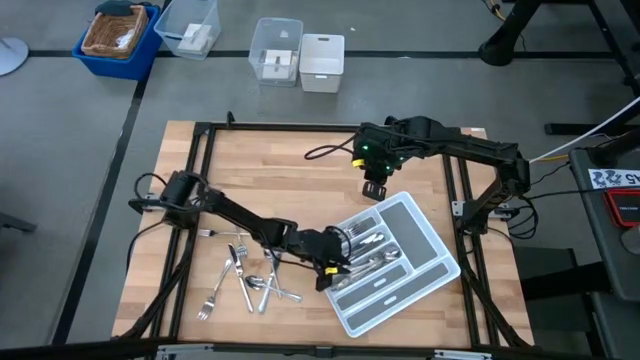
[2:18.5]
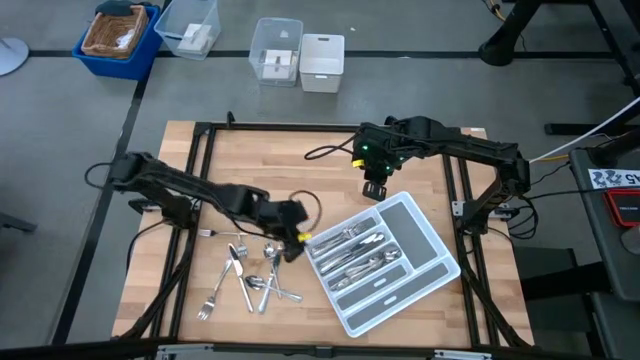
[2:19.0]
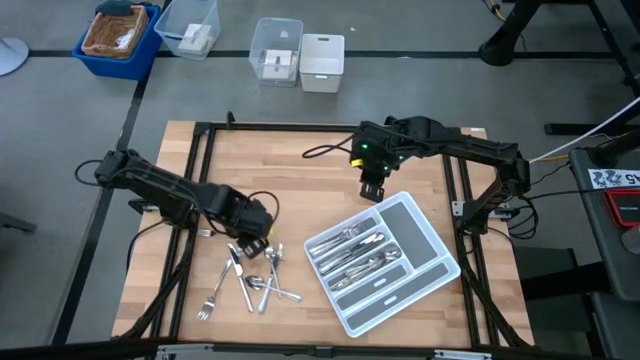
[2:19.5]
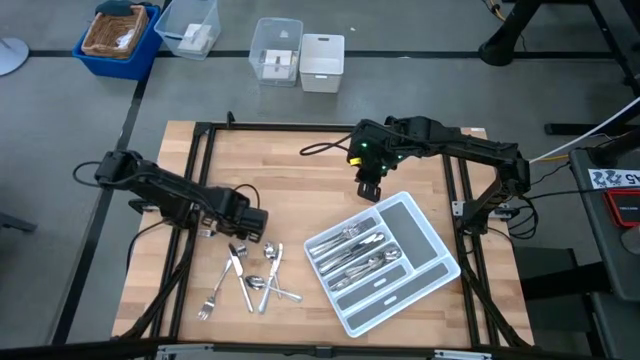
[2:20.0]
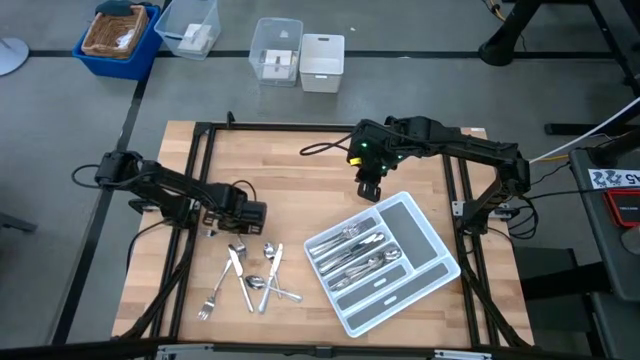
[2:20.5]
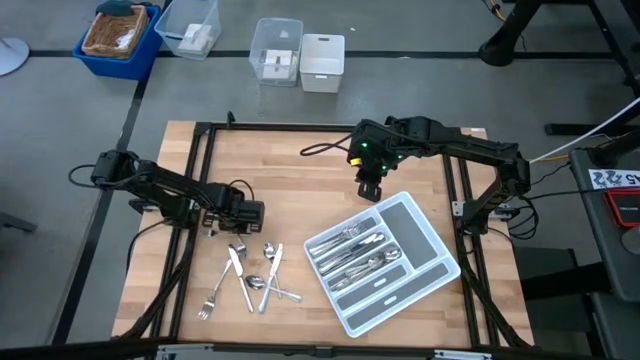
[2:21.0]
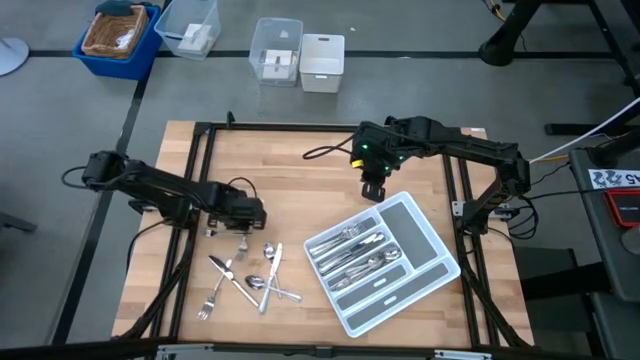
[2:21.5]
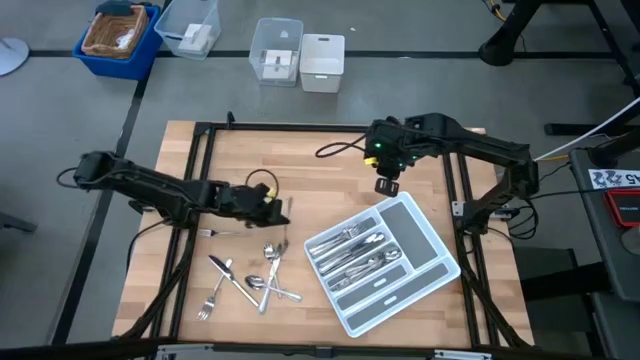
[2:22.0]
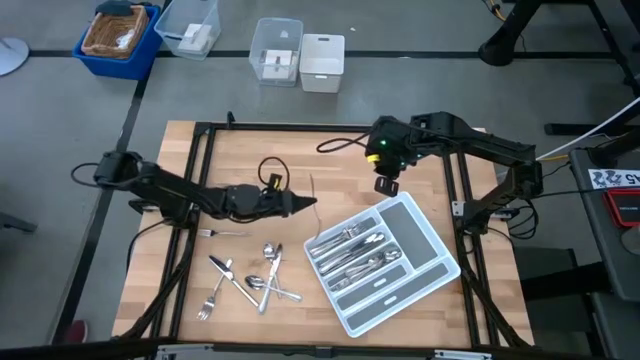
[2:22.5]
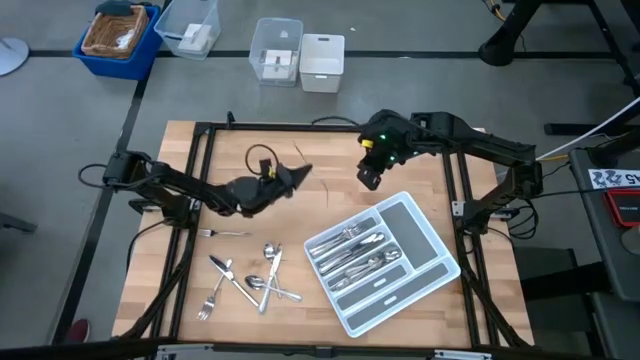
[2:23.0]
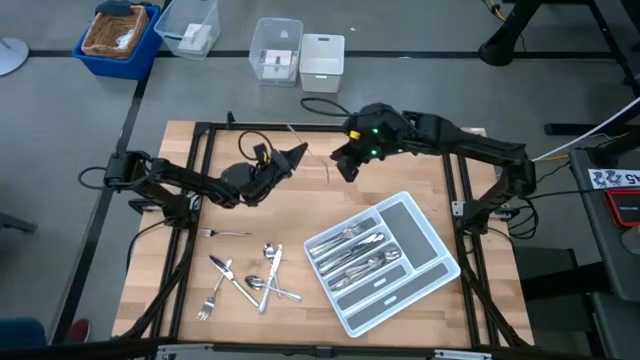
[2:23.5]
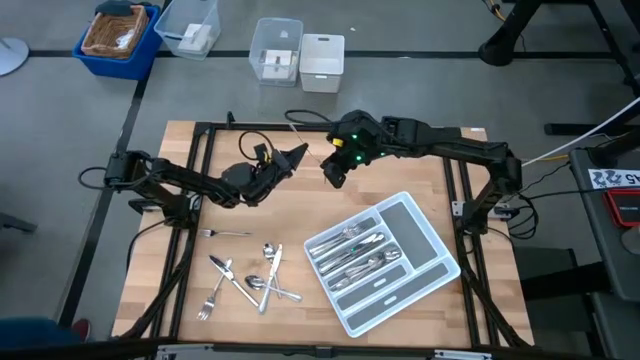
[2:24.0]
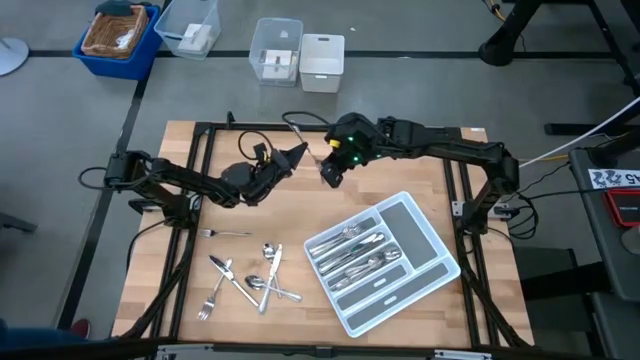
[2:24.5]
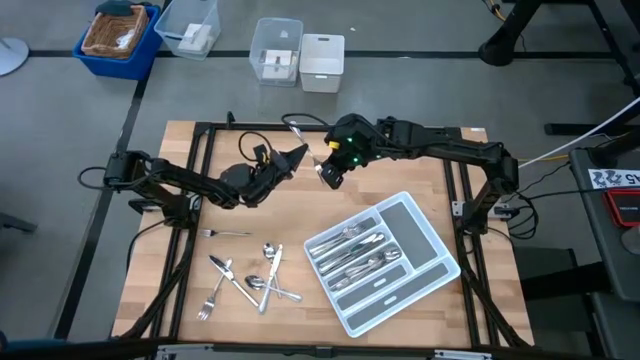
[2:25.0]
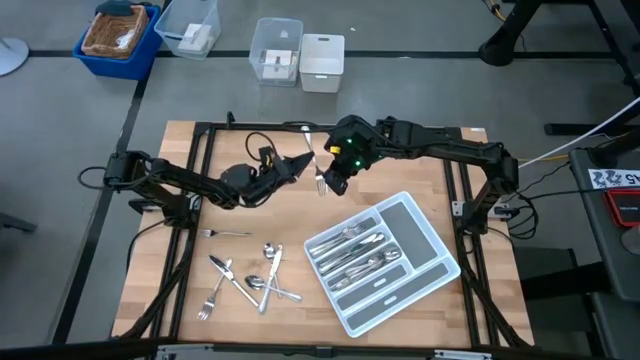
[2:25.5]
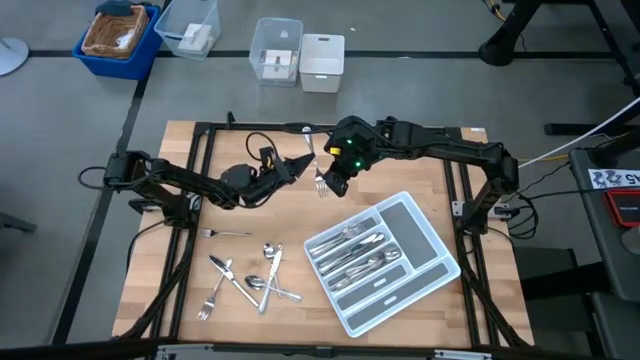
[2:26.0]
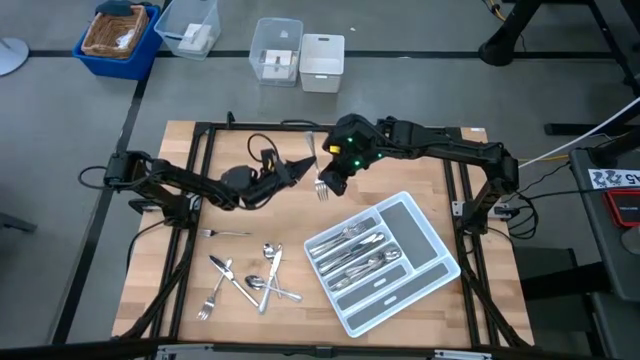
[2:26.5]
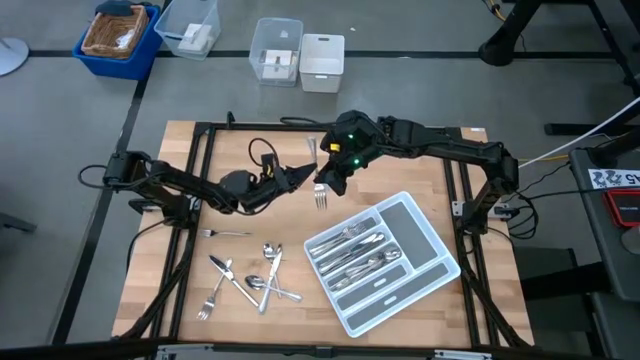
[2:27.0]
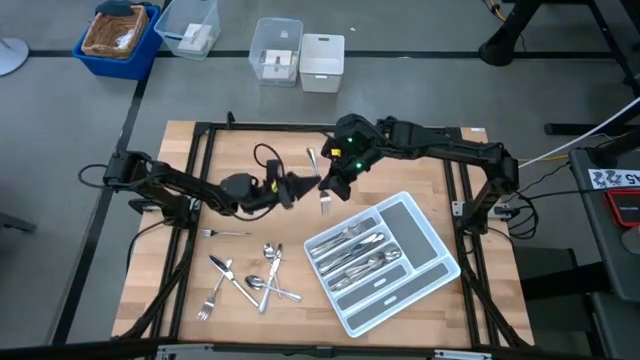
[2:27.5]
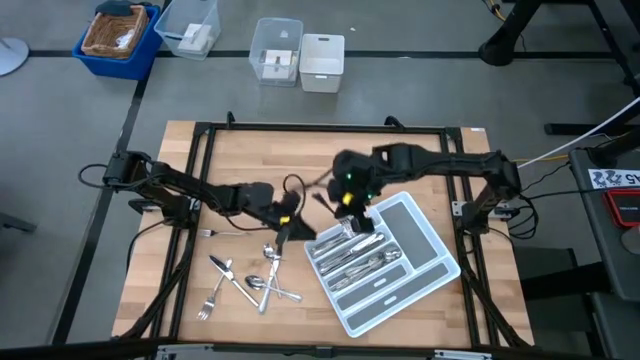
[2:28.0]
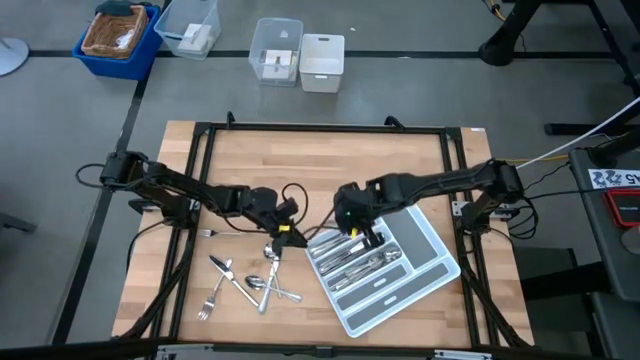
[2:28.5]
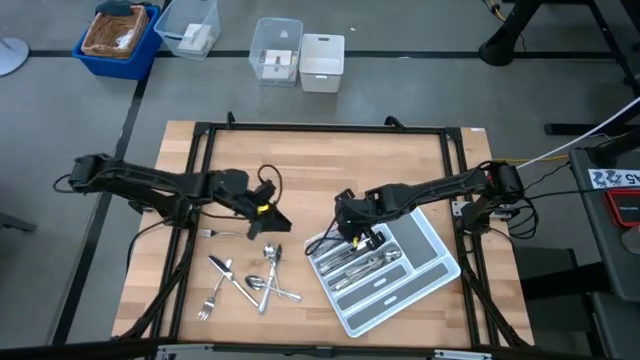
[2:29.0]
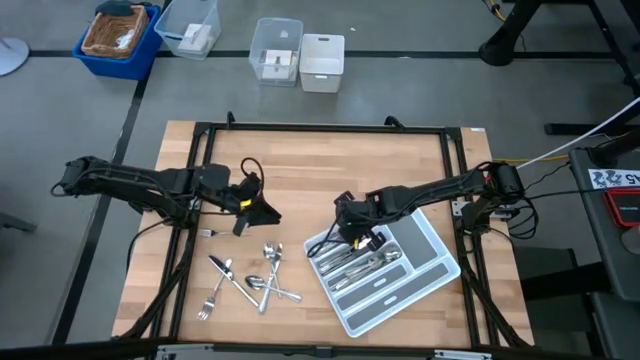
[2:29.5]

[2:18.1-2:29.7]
Task: Sort silverware
Put the silver fork into the silverware tray

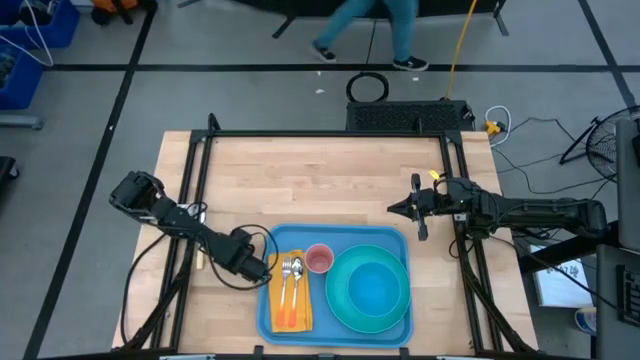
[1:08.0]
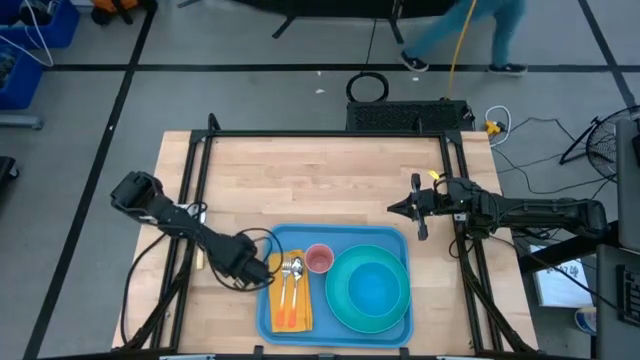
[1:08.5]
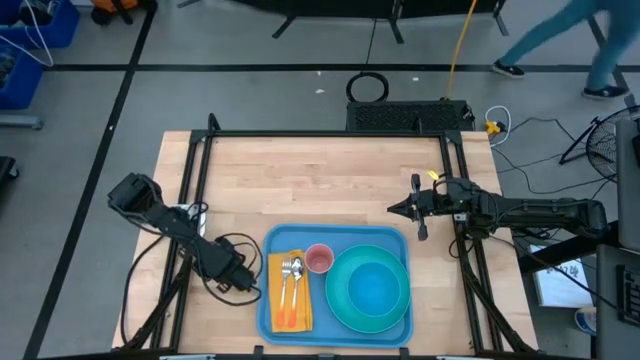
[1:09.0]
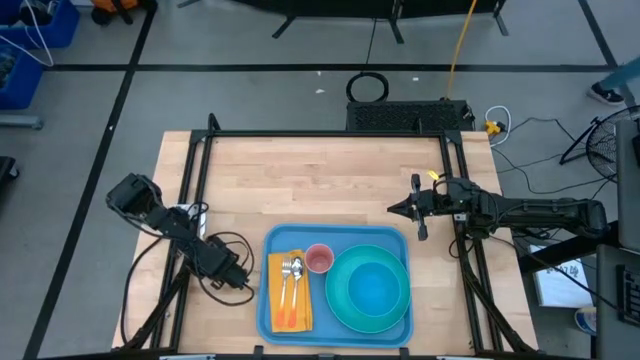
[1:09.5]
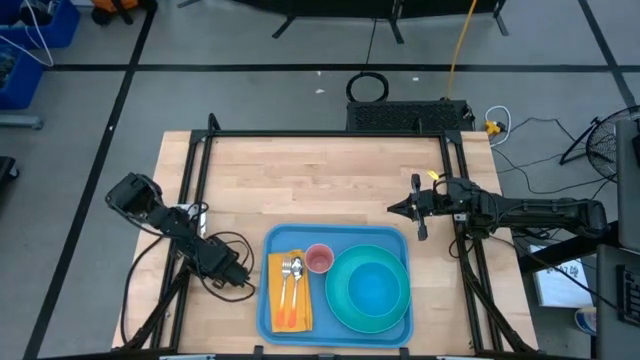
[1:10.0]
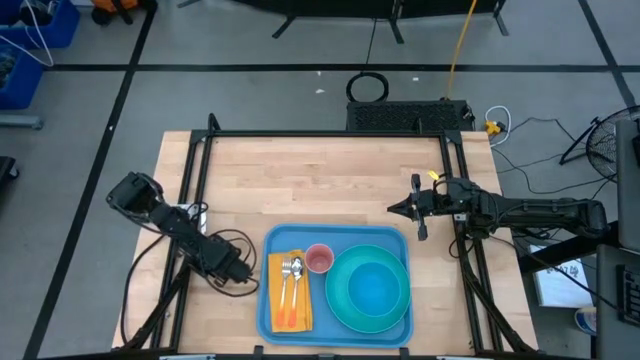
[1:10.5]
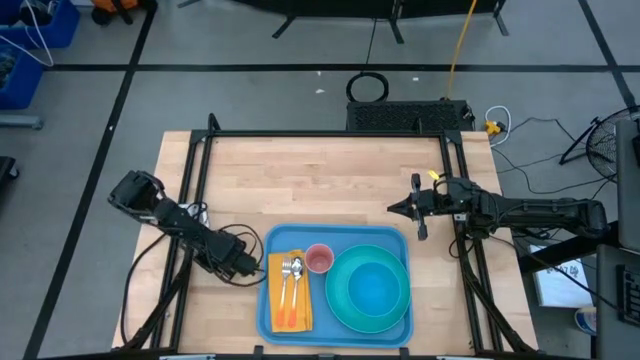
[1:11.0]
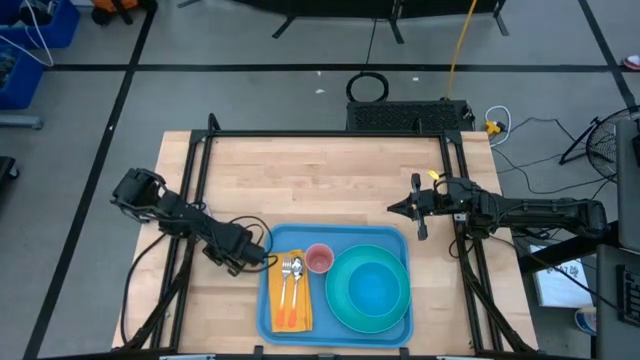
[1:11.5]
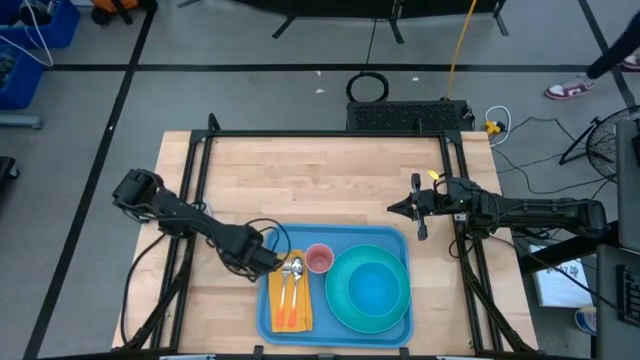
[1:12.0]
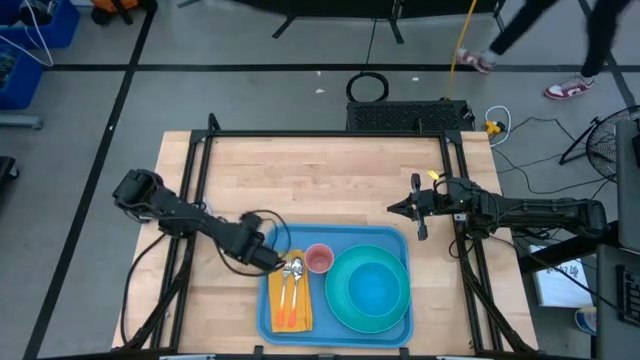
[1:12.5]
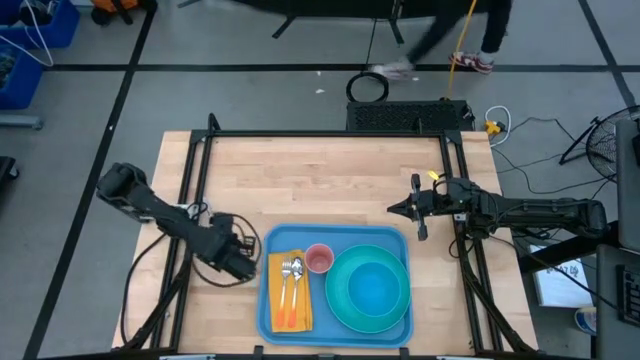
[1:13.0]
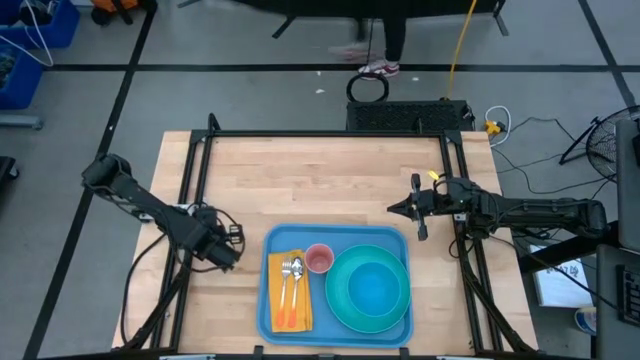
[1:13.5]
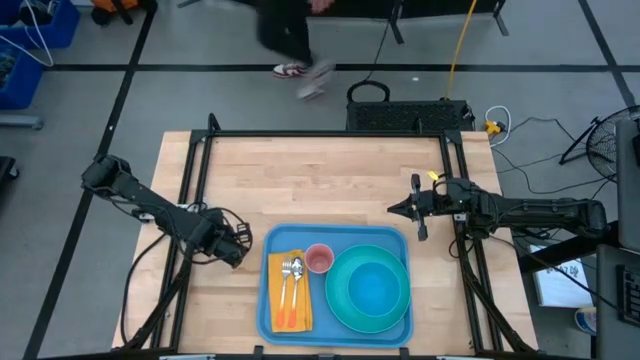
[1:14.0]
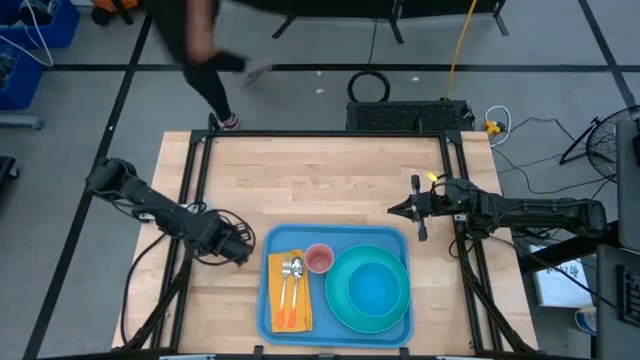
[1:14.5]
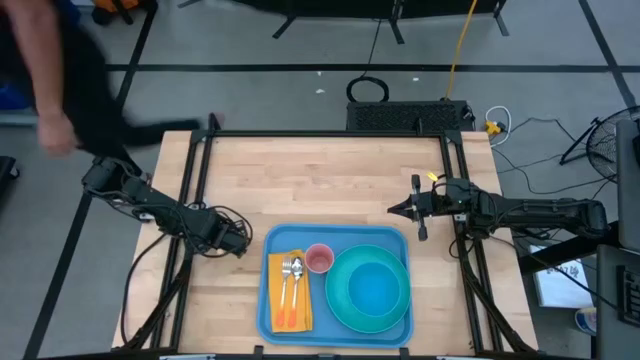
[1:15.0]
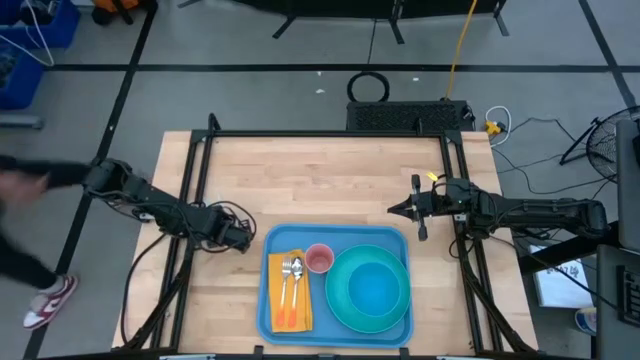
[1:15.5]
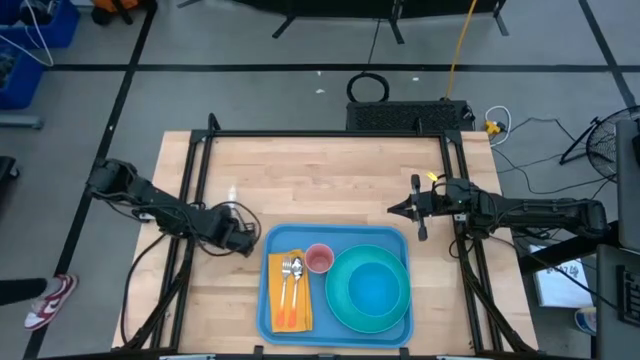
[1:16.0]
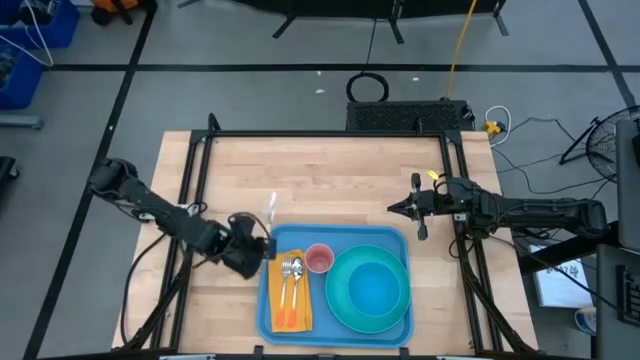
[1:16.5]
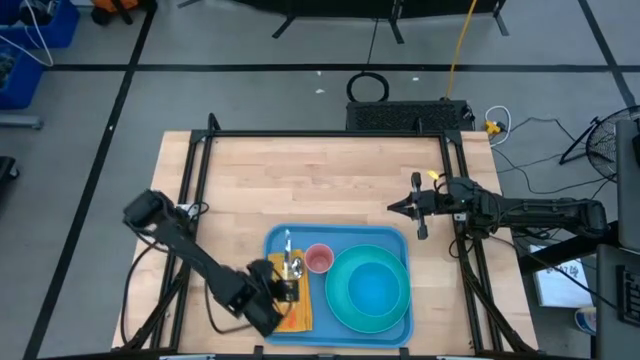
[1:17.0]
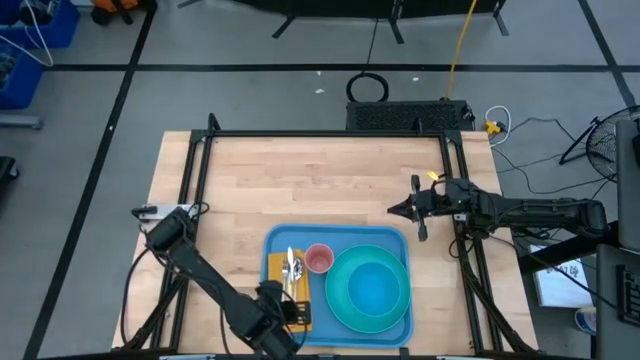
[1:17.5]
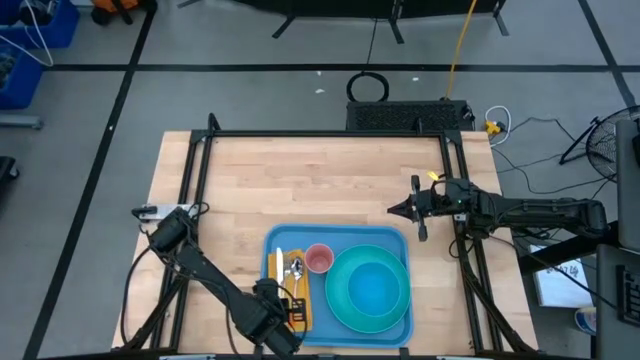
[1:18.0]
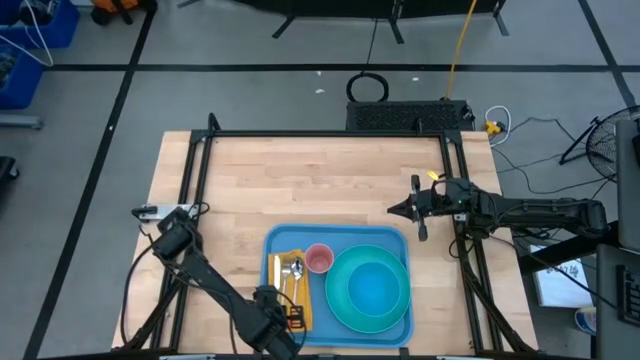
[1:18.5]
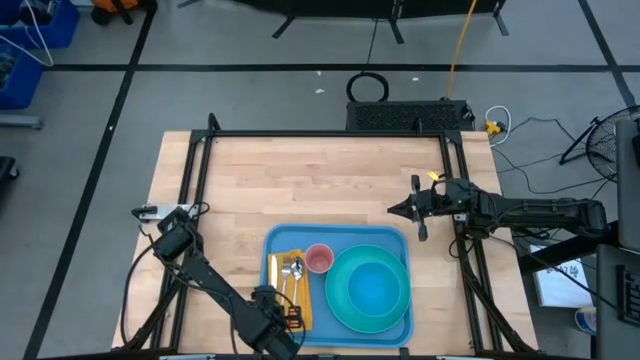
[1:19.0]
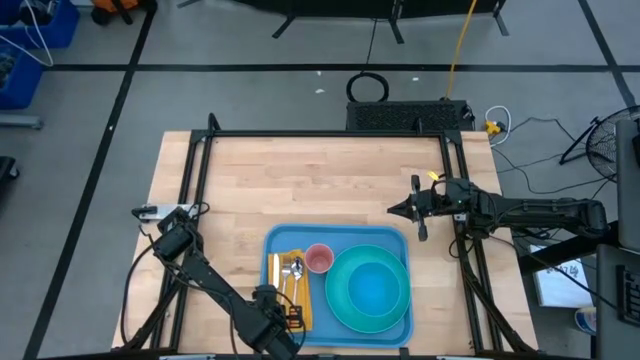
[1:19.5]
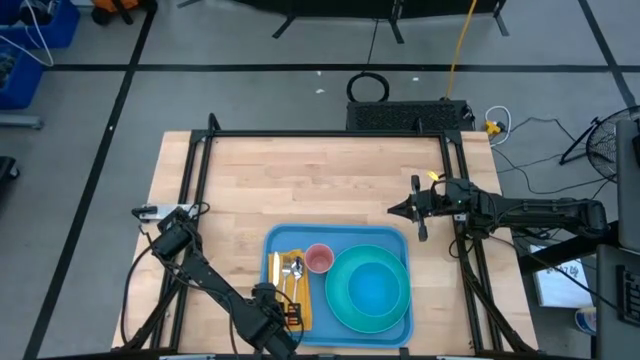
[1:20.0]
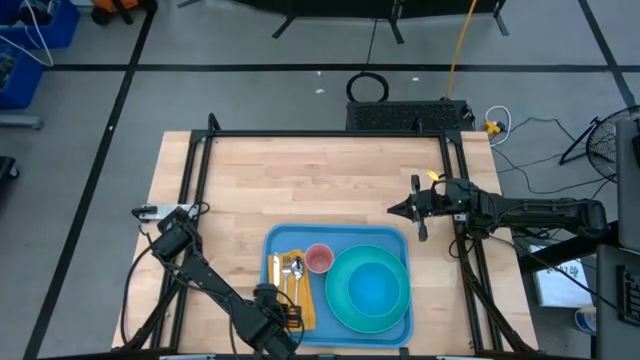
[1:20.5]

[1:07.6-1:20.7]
Task: Set up tray
Put the knife on the yellow napkin to the left of the orange fork
